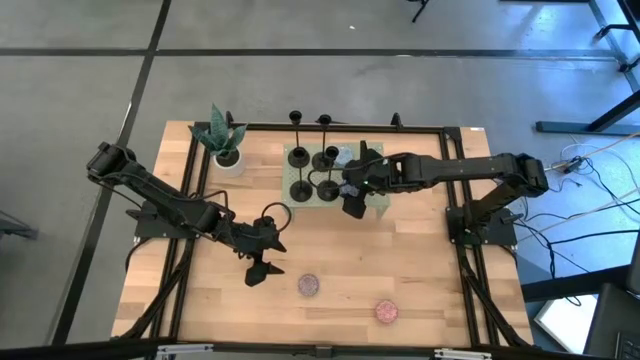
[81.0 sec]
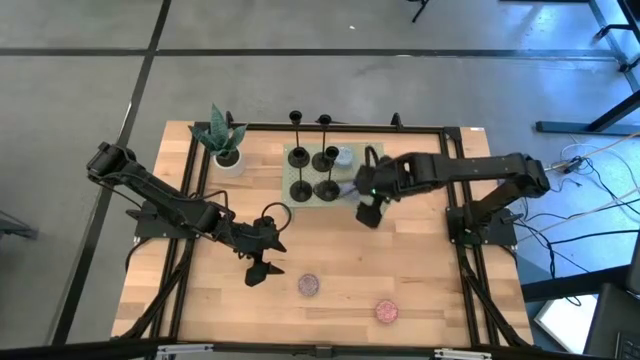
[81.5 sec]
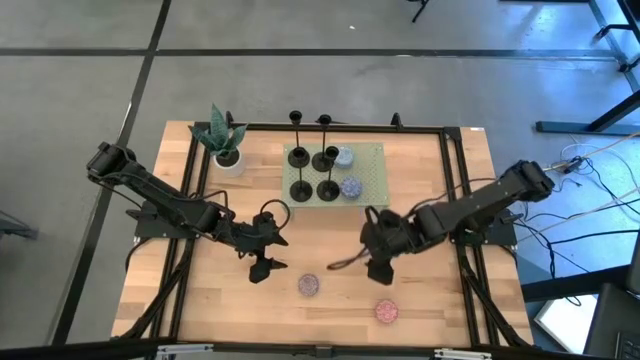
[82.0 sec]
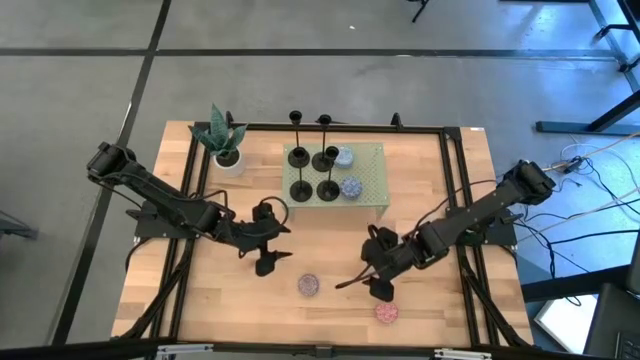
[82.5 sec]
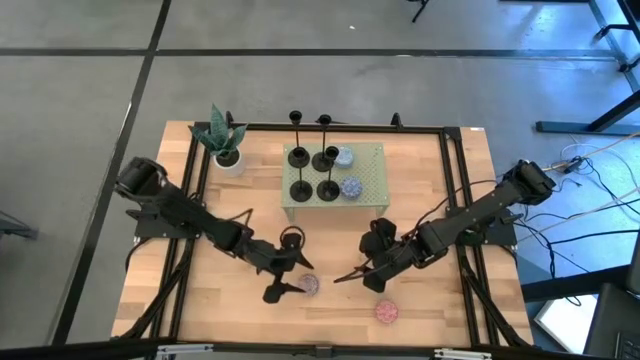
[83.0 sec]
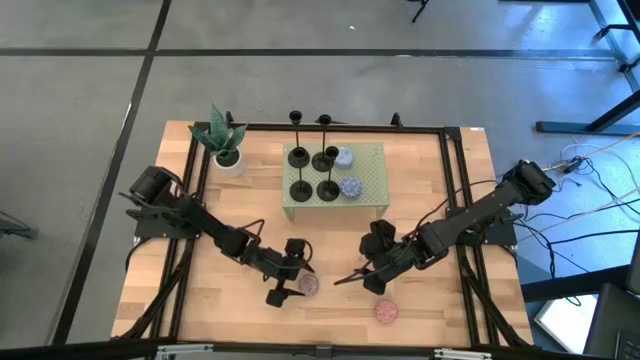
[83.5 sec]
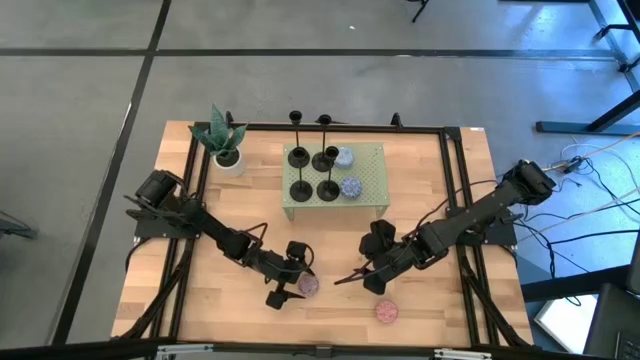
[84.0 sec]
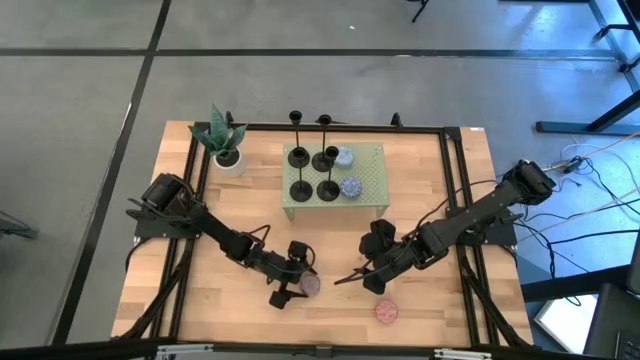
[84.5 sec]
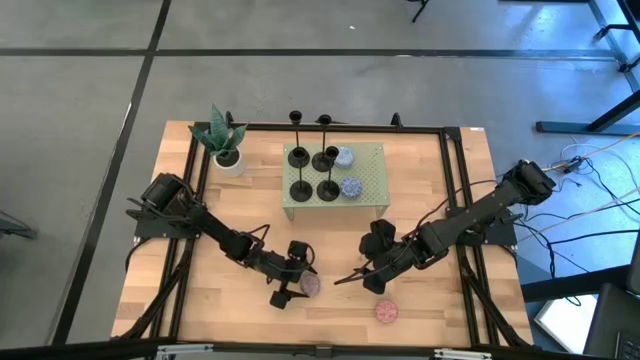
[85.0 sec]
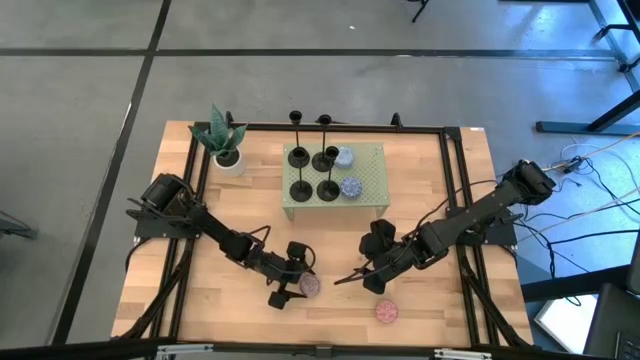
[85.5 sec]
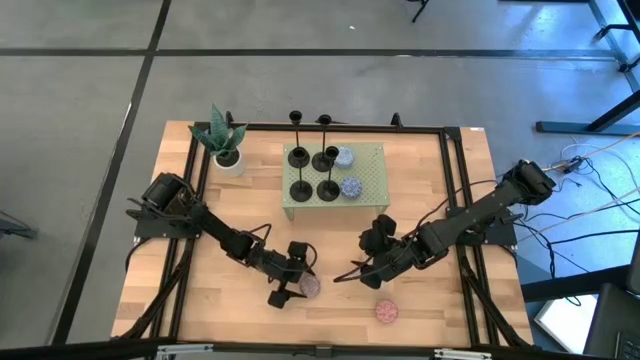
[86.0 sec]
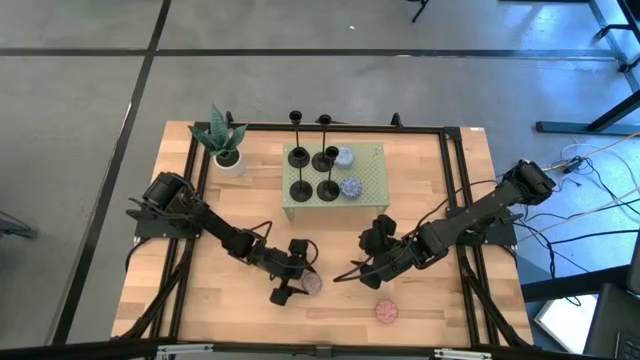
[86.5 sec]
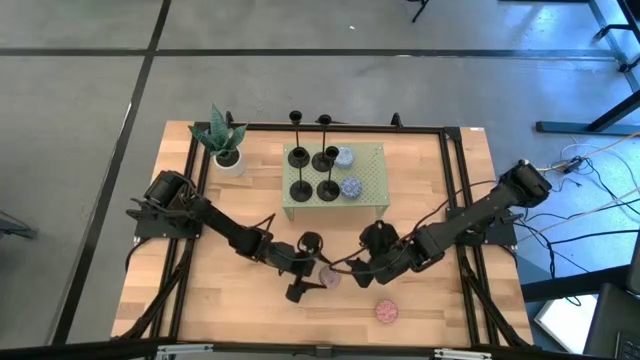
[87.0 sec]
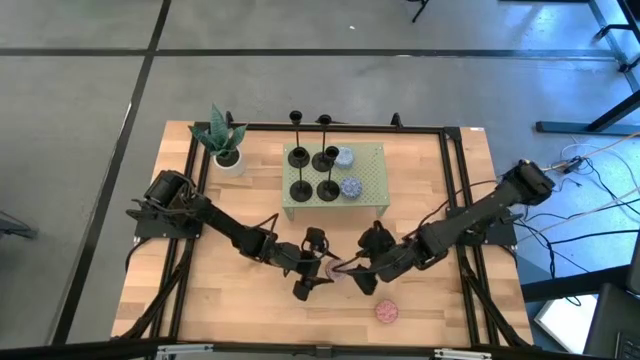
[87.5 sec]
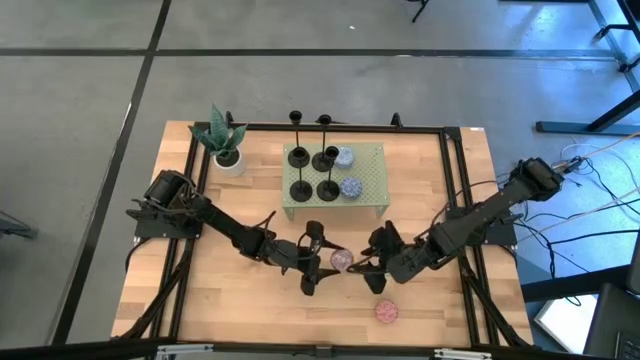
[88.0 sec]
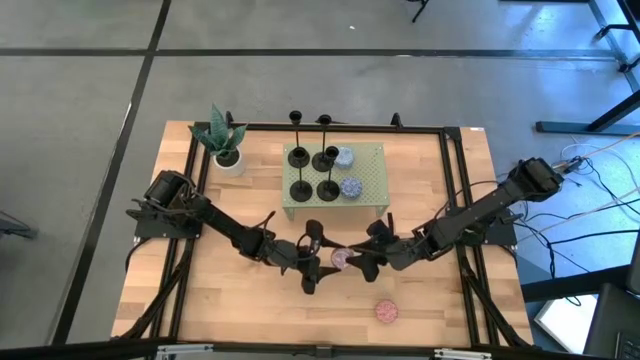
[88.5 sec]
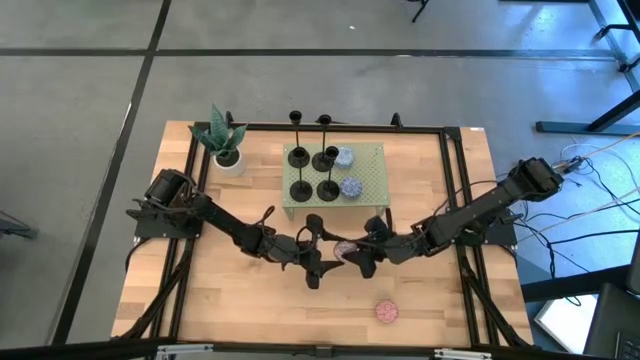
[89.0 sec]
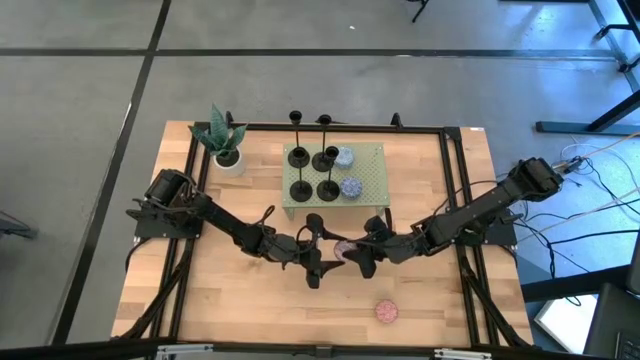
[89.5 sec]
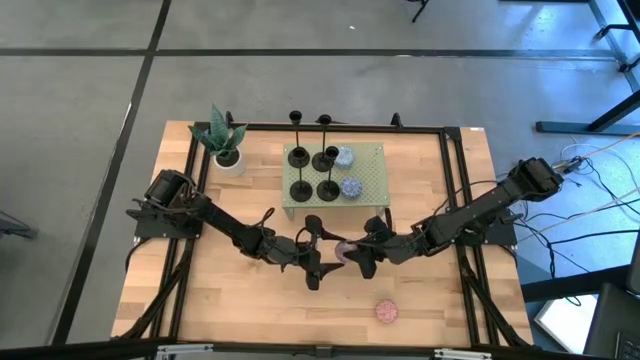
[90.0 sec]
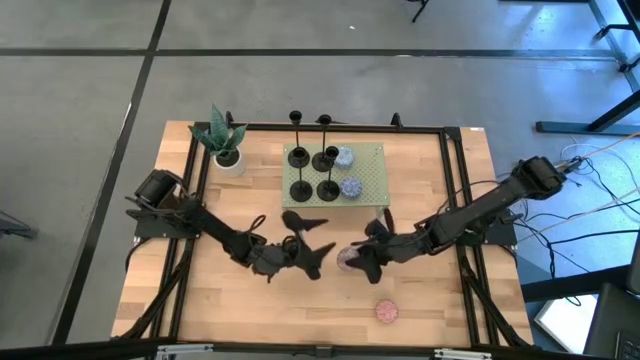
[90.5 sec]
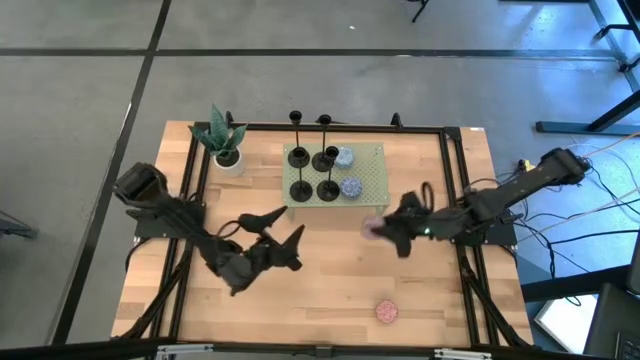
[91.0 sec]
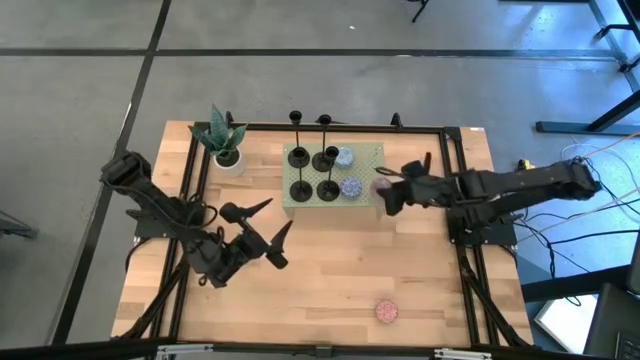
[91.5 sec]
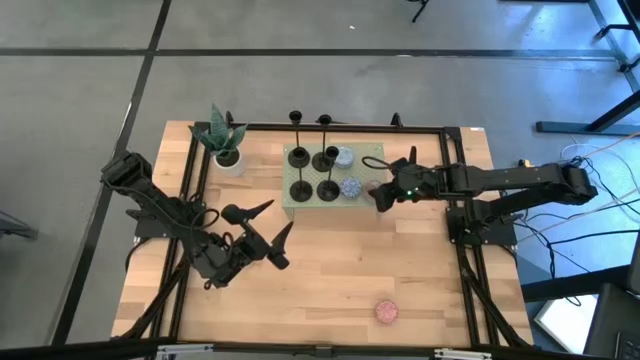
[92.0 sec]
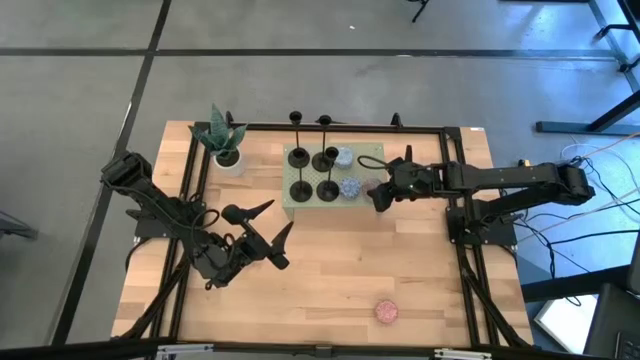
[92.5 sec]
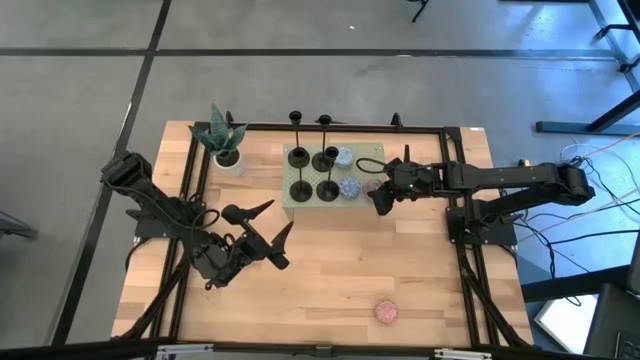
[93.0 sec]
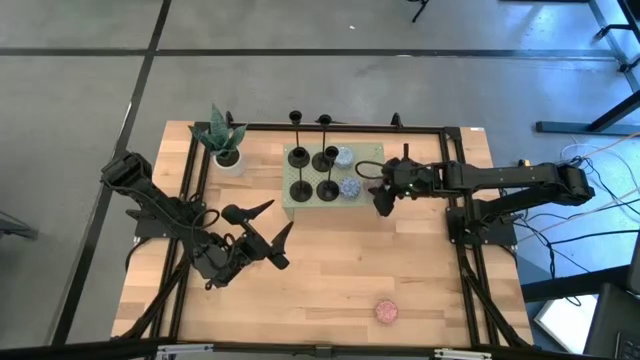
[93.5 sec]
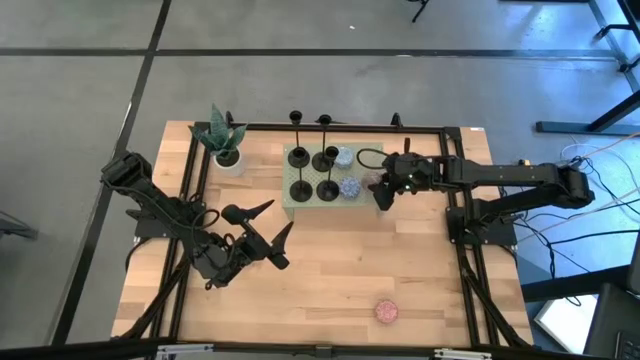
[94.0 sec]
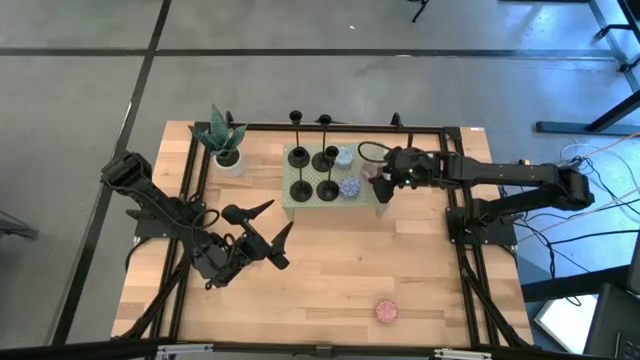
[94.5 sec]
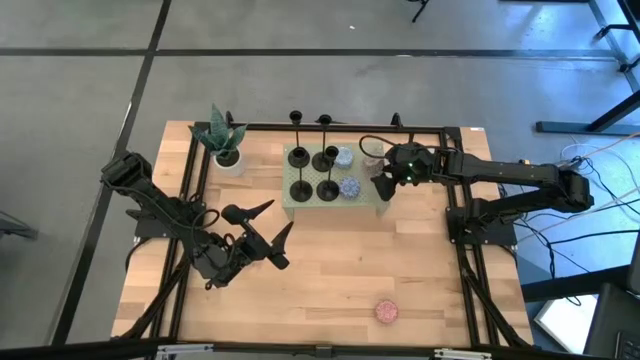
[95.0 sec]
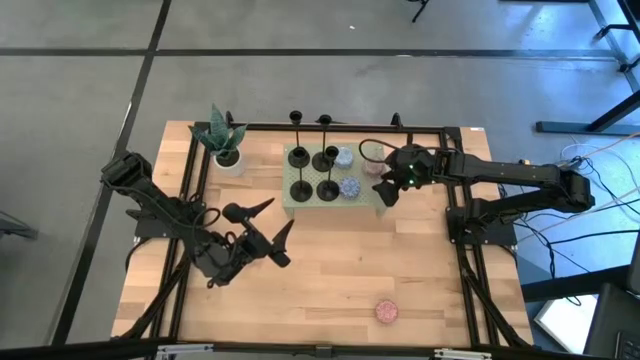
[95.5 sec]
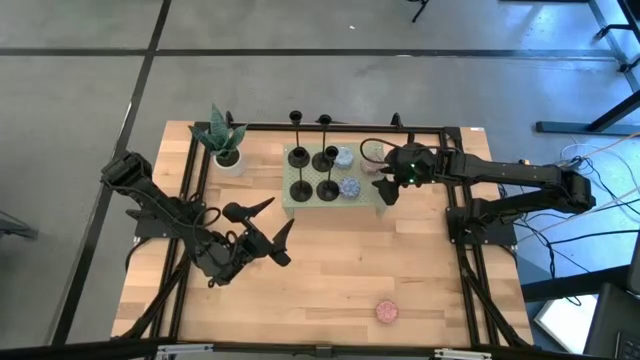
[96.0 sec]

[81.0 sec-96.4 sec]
Task: Pick & Place candle stick holders
Put the red scented candle on the shelf

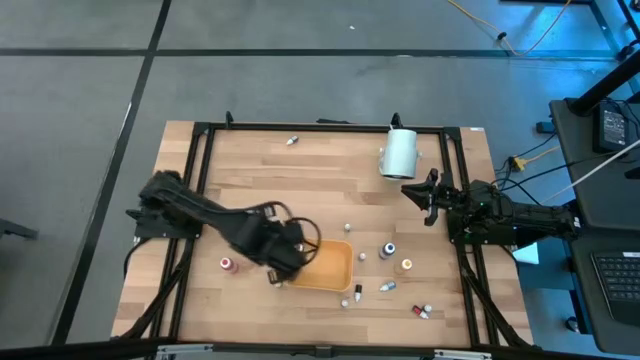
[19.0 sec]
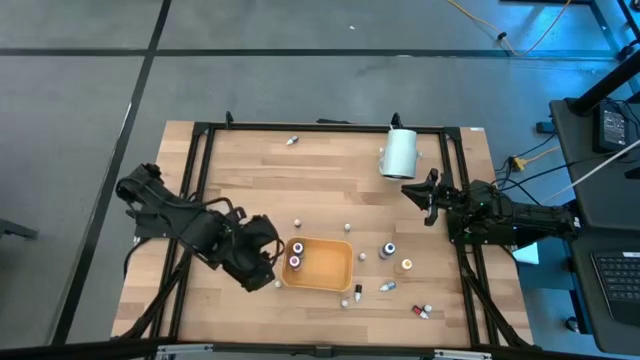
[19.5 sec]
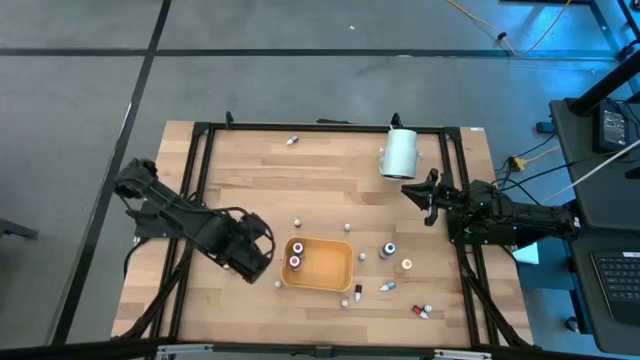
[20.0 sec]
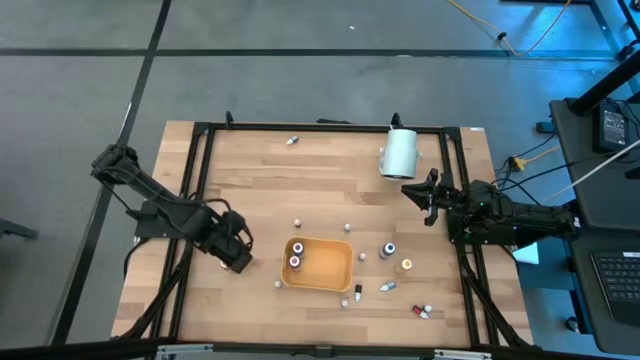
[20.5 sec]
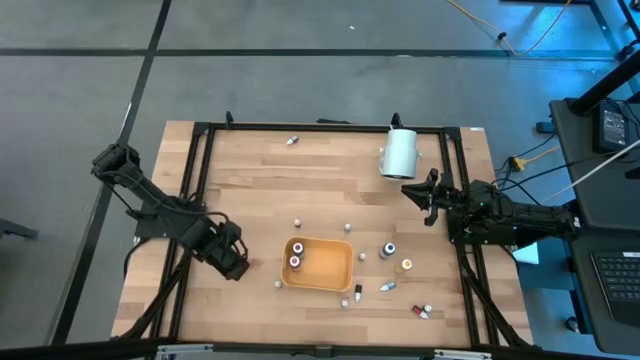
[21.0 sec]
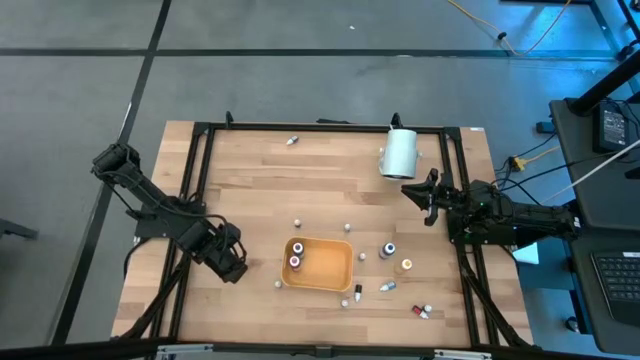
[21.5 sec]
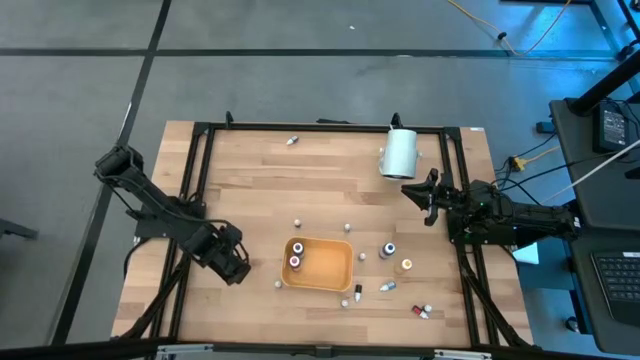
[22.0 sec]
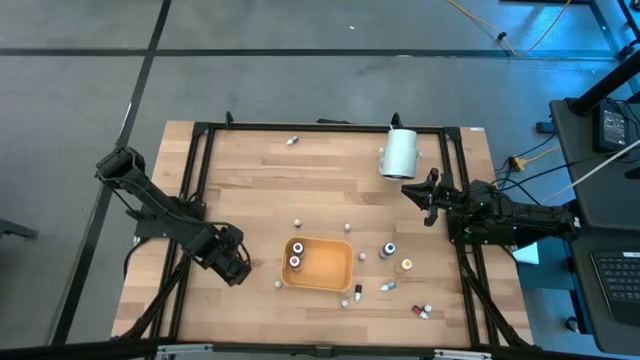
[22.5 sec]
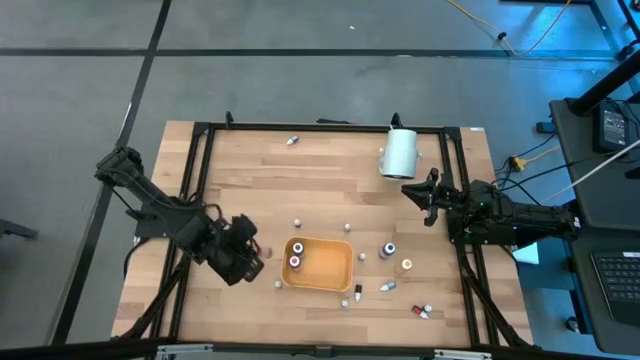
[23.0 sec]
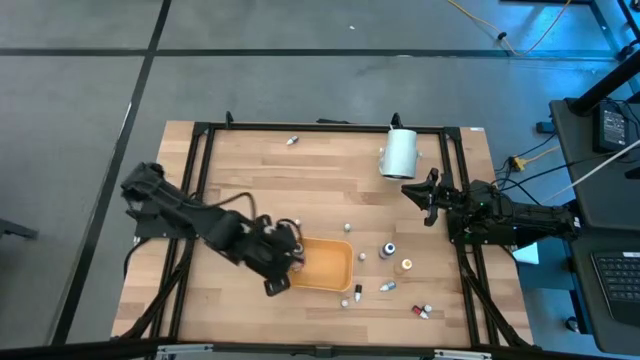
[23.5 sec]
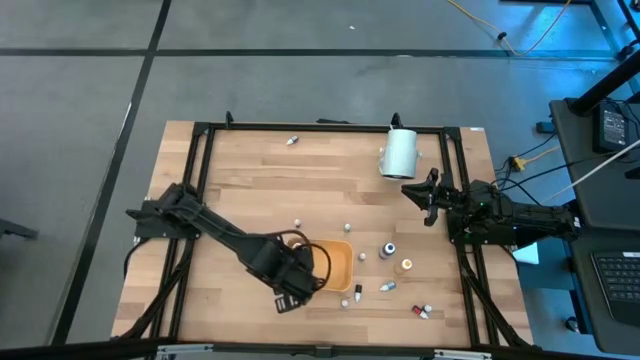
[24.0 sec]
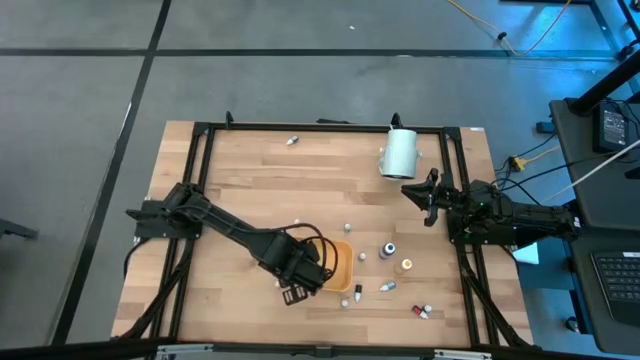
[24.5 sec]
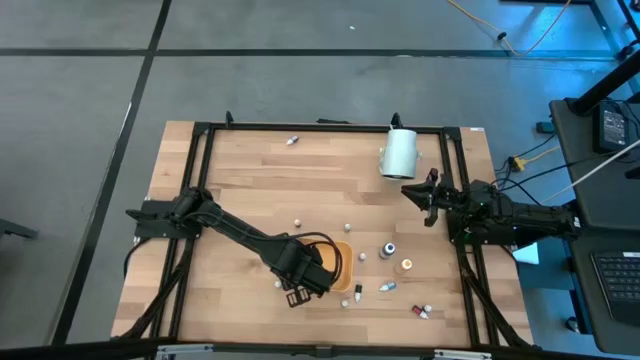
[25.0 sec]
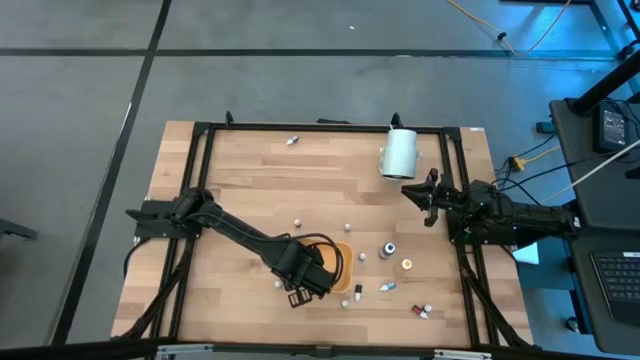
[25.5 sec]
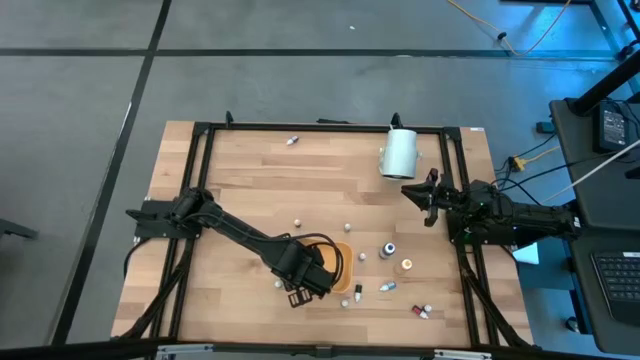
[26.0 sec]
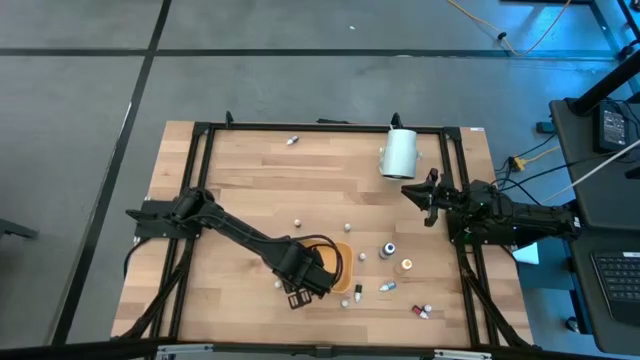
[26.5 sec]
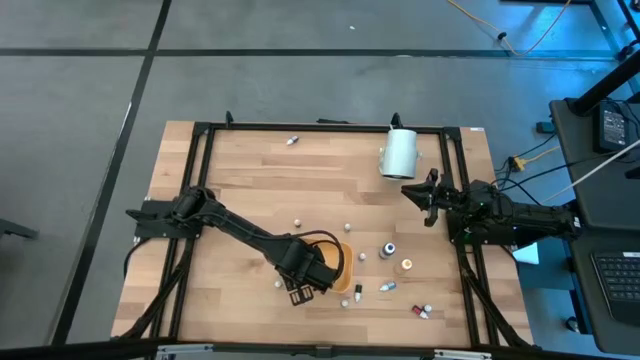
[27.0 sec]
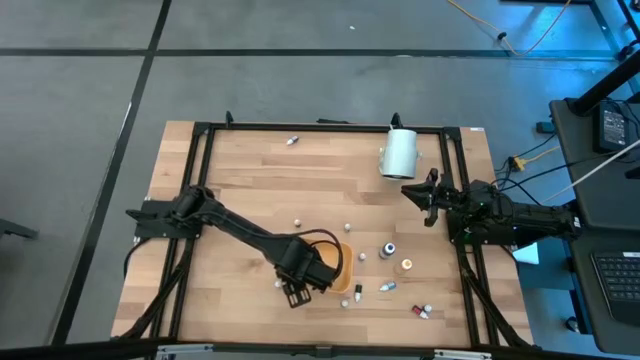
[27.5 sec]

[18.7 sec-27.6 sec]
Task: Pick & Place food coloring
Put the large orange food coloring bottle in the yellow bin
